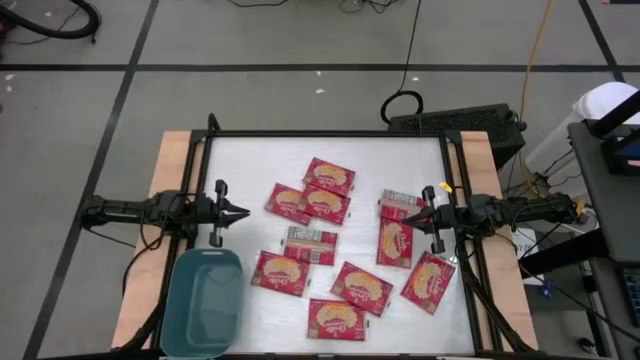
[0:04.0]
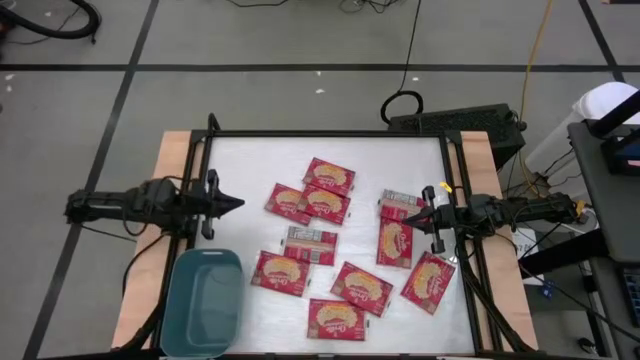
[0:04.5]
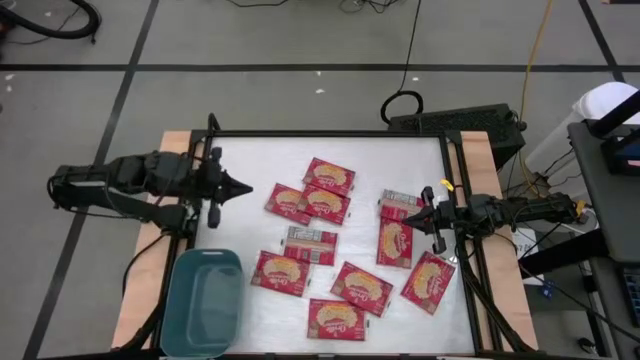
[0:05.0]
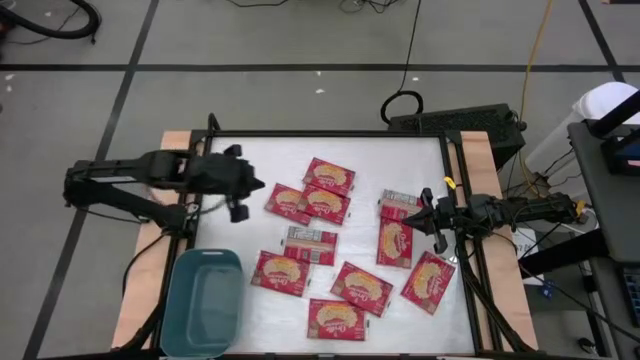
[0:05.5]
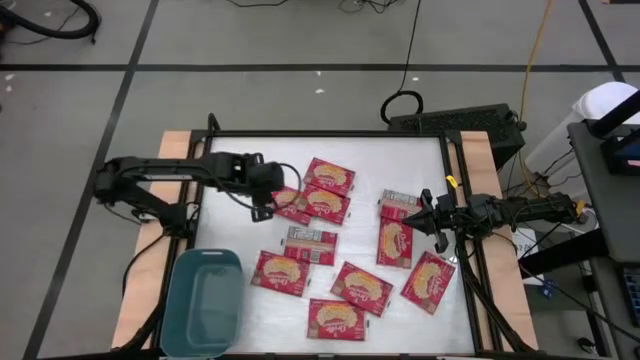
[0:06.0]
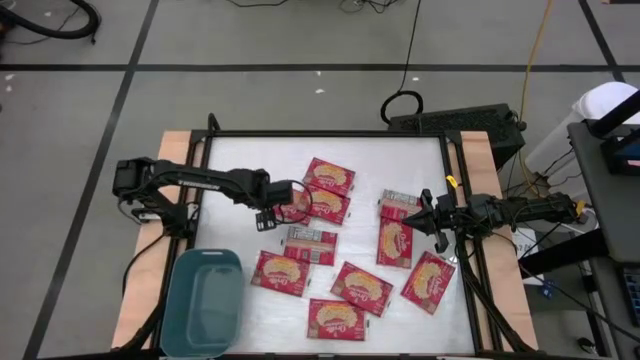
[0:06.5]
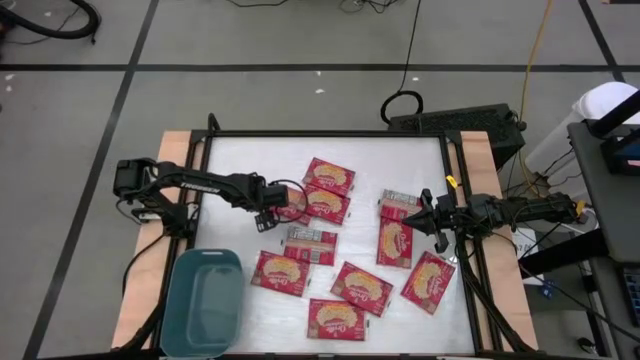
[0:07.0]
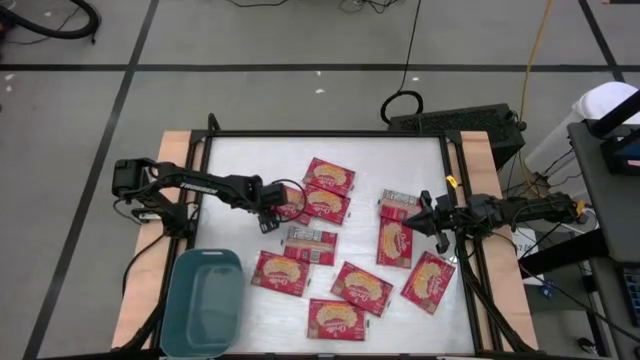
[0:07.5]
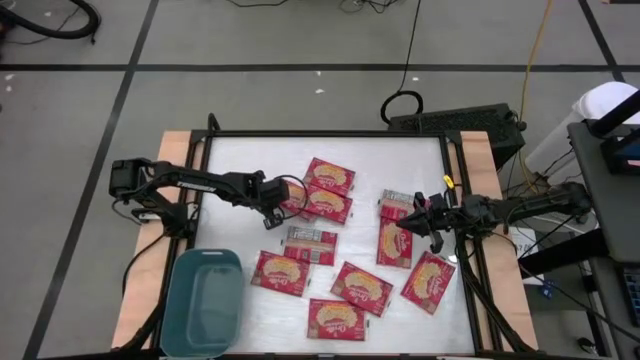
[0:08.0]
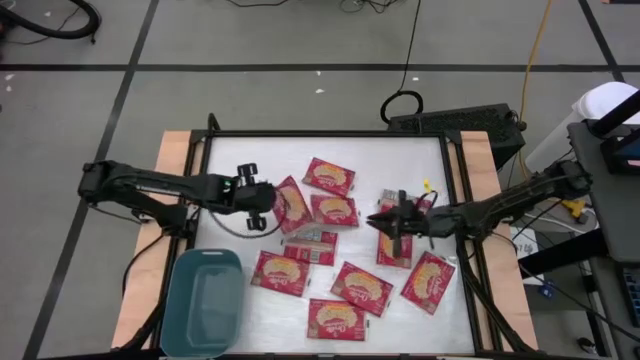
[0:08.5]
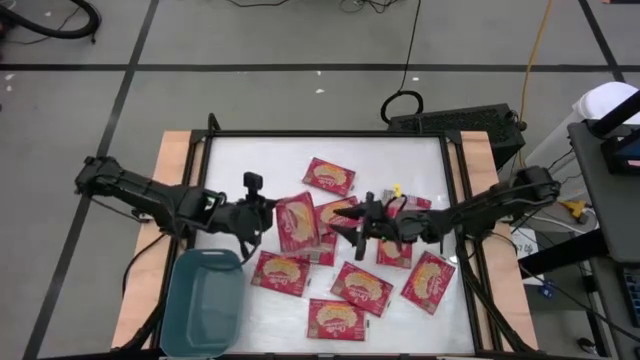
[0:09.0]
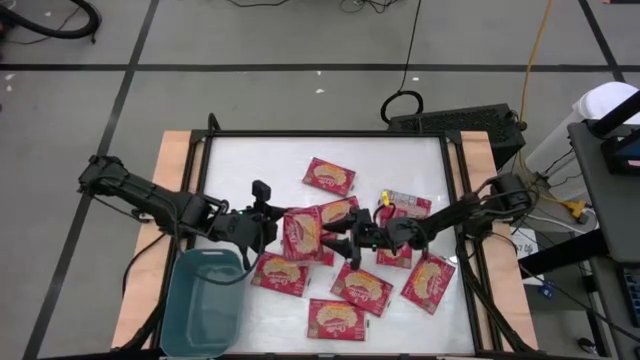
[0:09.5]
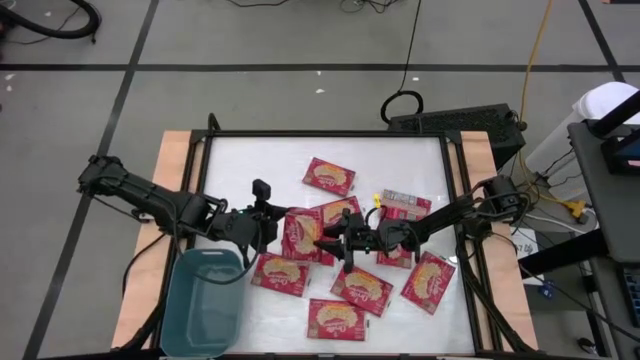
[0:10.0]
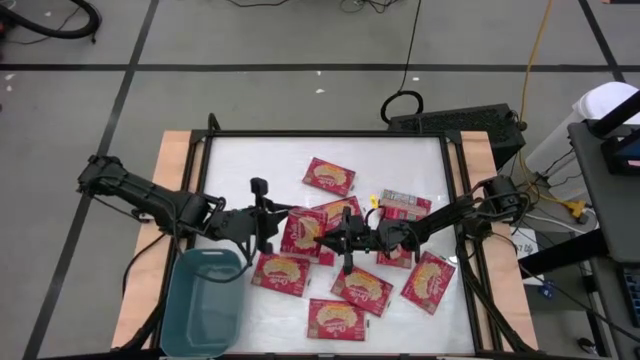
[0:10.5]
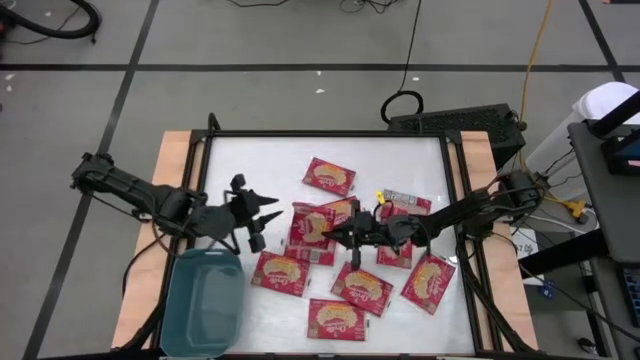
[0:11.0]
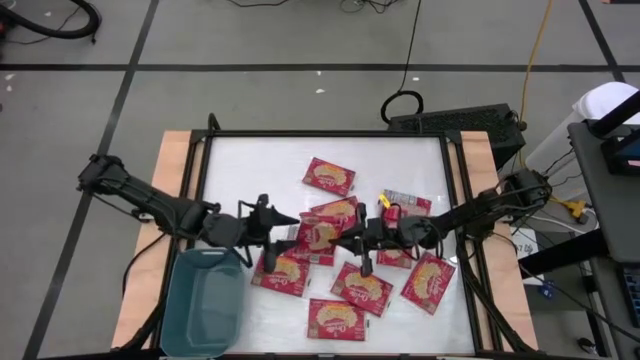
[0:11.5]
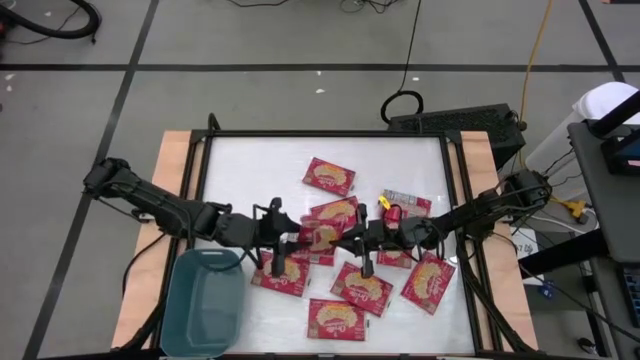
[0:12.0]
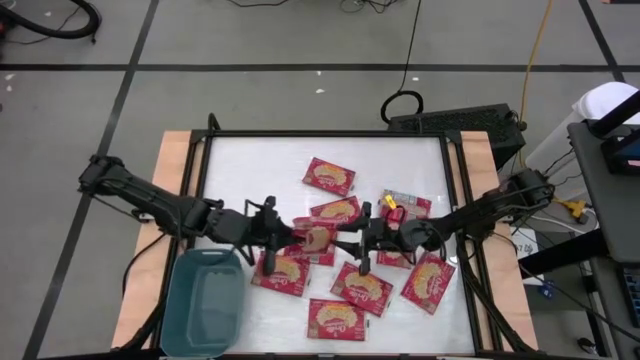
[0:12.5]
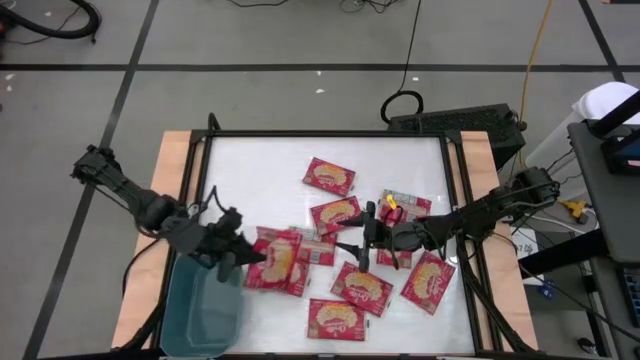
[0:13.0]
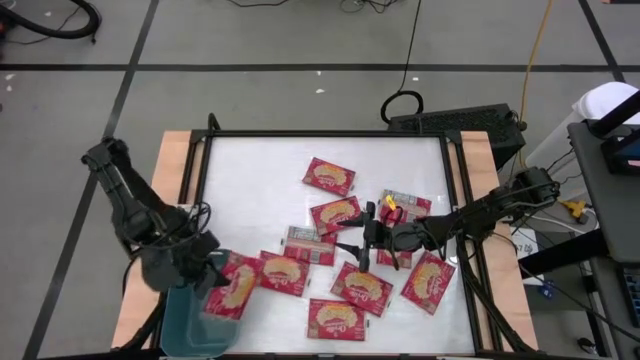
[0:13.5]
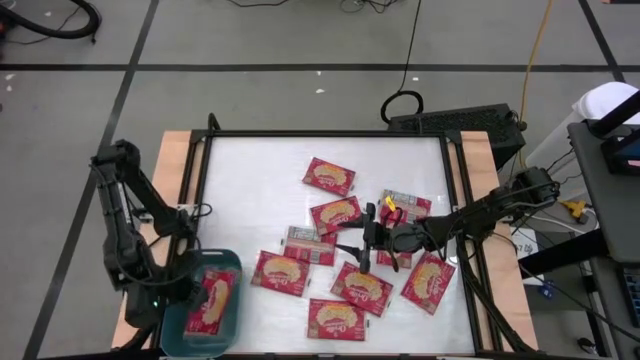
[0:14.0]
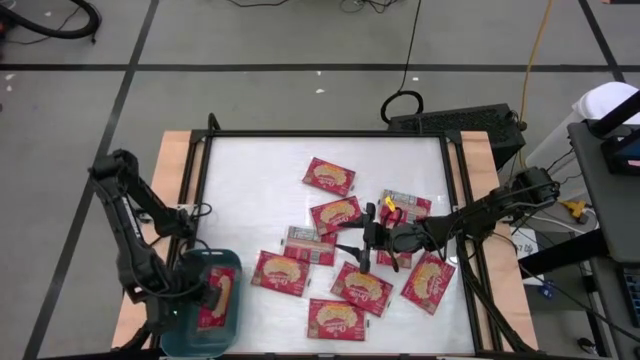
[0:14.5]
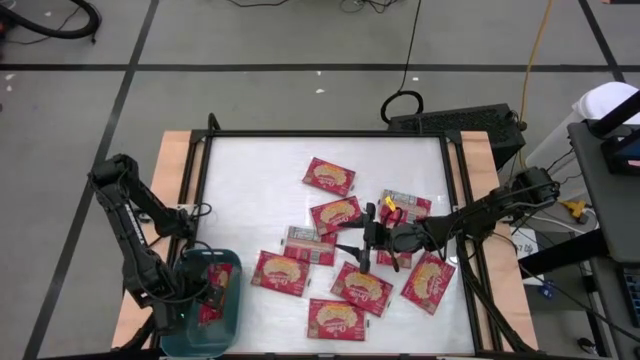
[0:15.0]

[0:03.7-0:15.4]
Task: Sort popcorn bags into baskets
Put the red popcorn bag into the blue bin

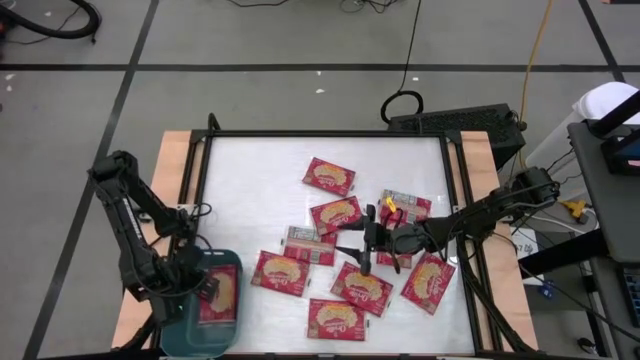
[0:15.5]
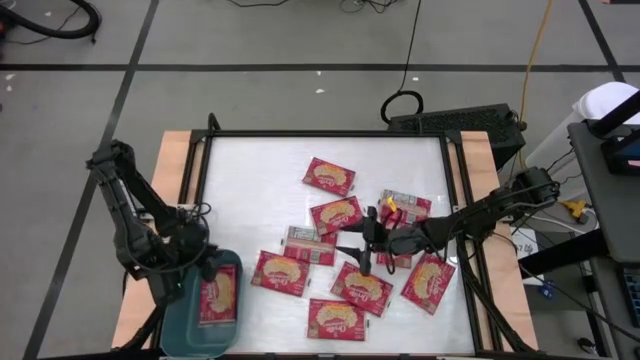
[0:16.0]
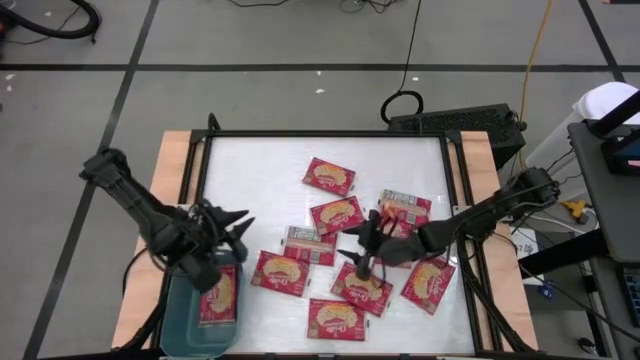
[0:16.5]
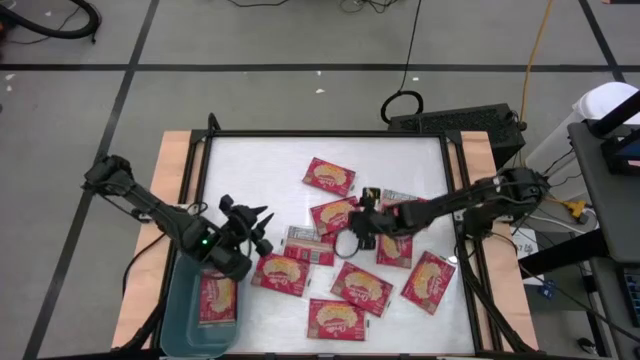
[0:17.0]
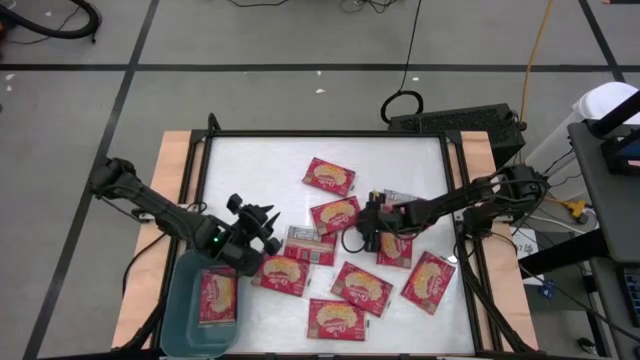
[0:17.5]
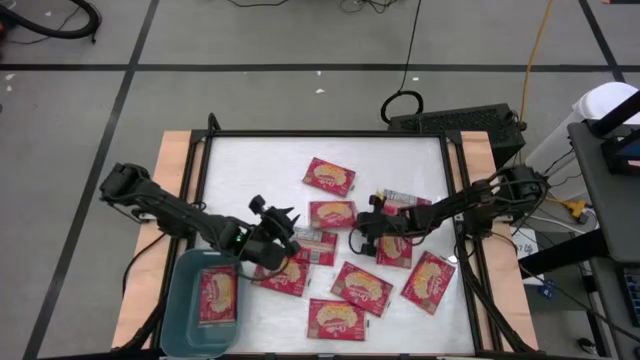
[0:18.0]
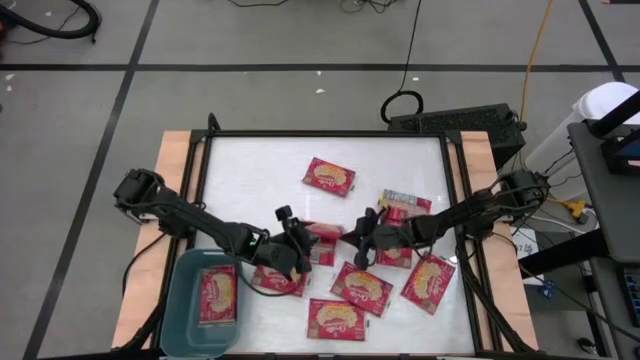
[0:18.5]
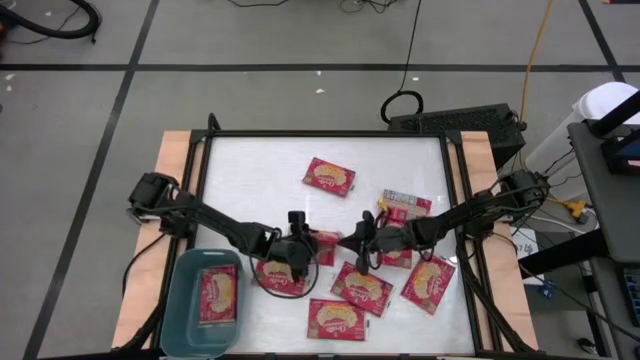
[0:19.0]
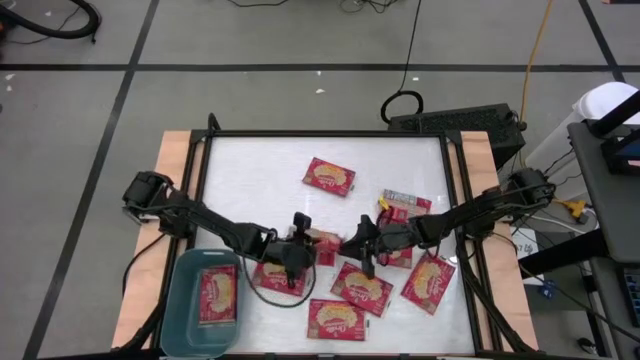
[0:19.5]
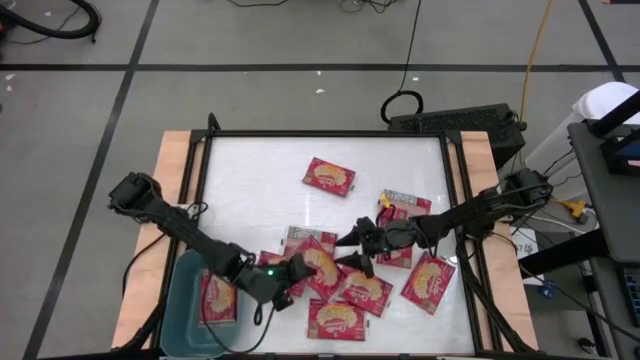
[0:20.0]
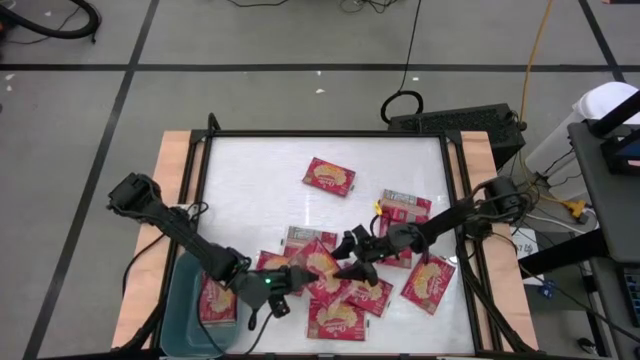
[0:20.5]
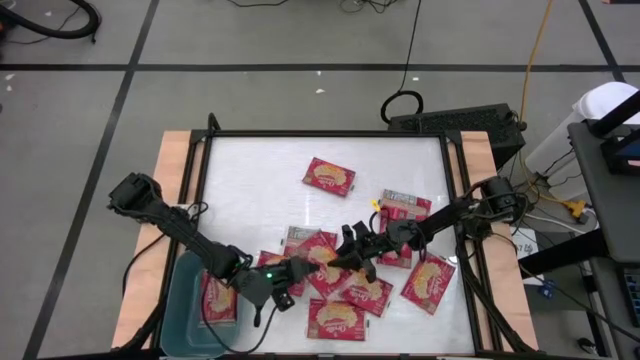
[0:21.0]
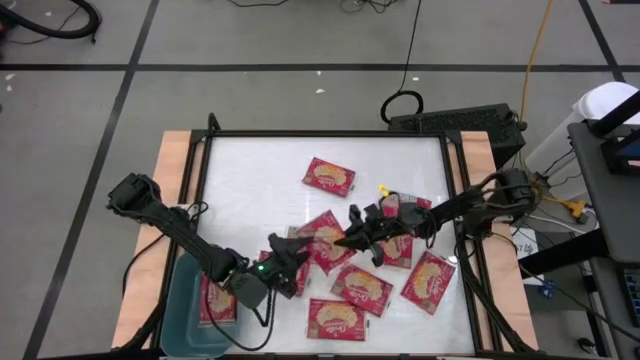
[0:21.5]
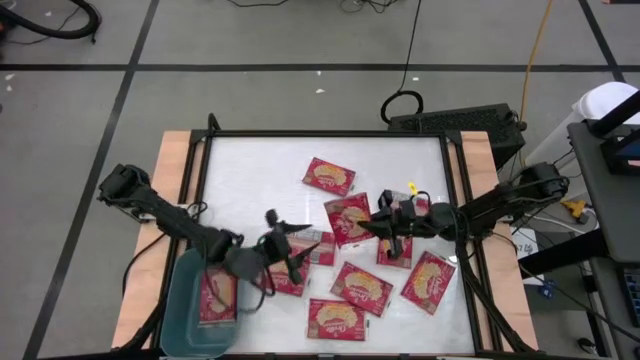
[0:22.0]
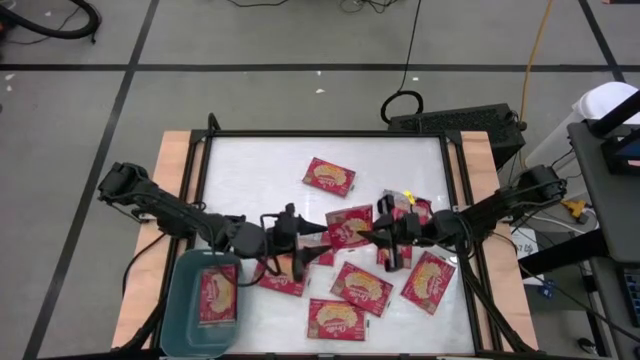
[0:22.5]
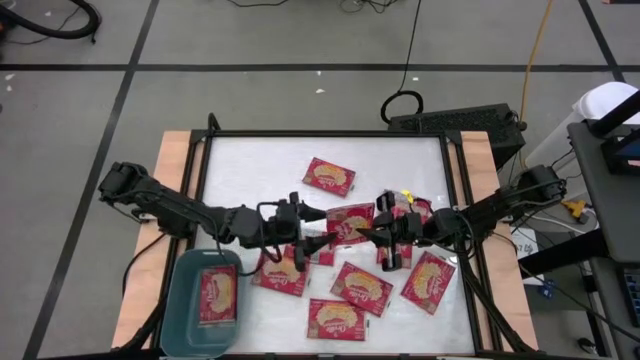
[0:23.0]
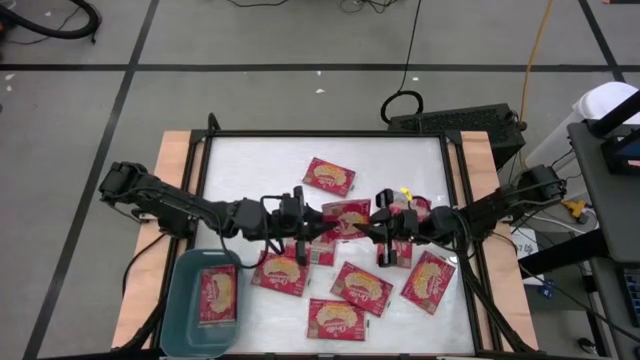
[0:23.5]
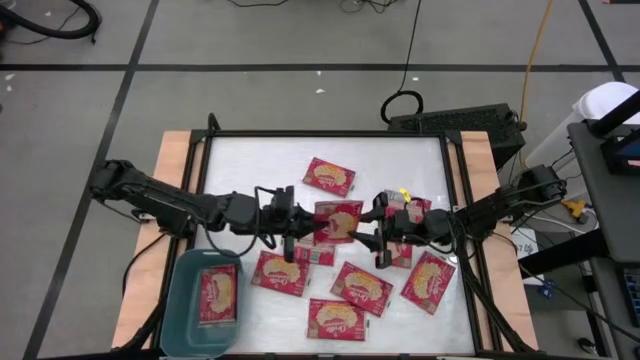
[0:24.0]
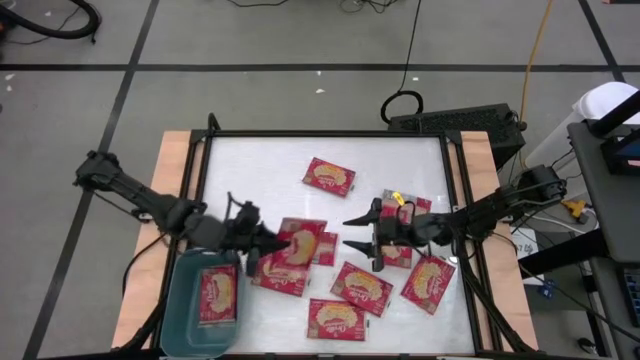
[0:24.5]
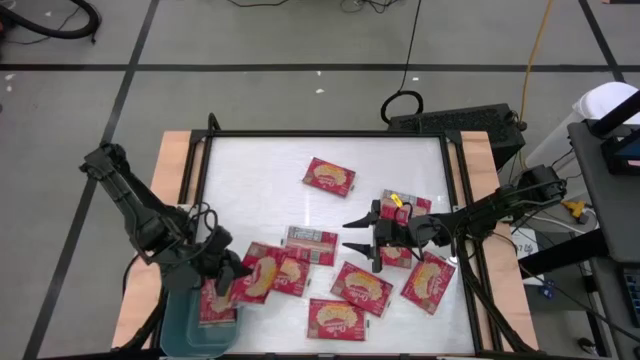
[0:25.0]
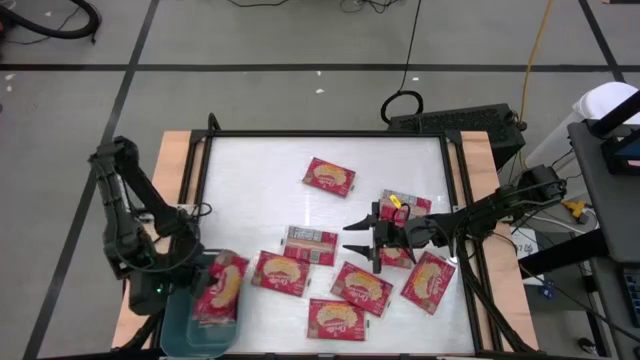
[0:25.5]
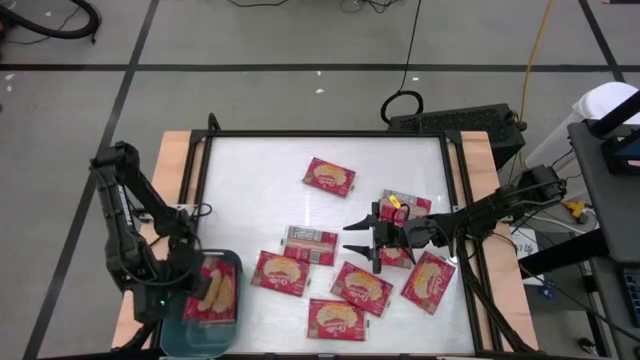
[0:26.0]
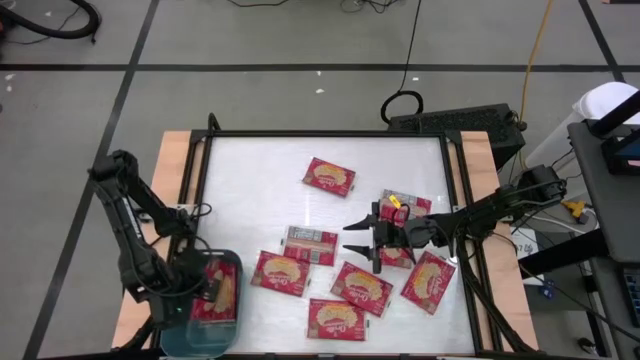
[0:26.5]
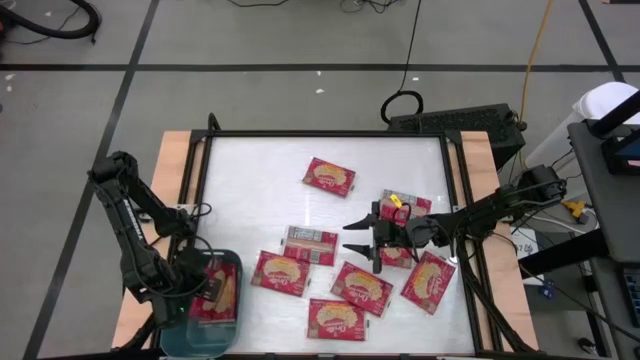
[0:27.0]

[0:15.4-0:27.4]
Put the red popcorn bag into the blue bin
